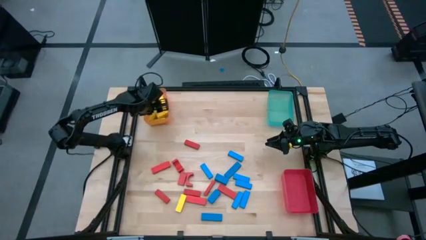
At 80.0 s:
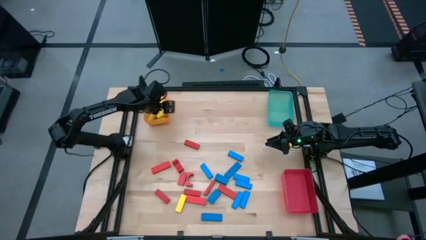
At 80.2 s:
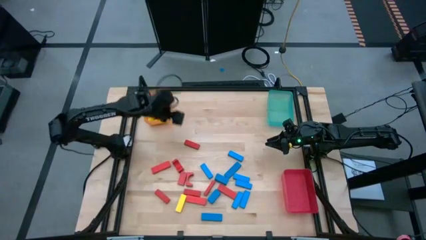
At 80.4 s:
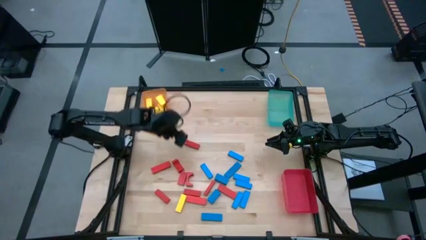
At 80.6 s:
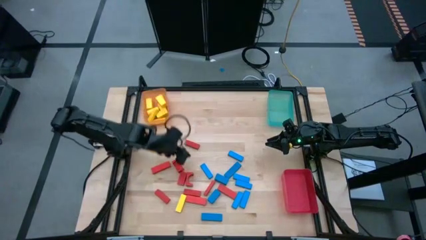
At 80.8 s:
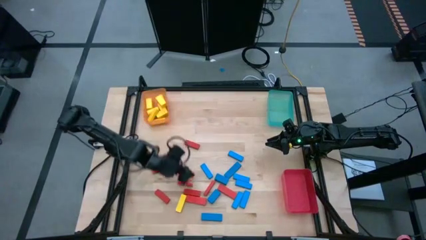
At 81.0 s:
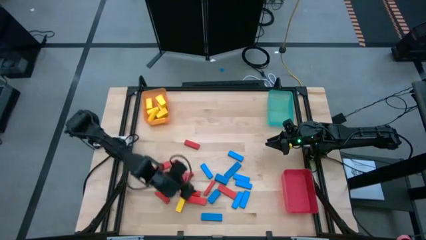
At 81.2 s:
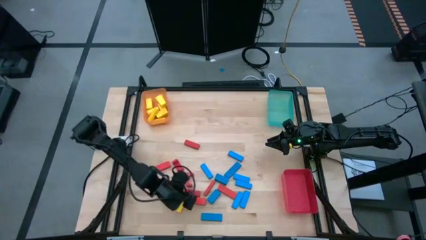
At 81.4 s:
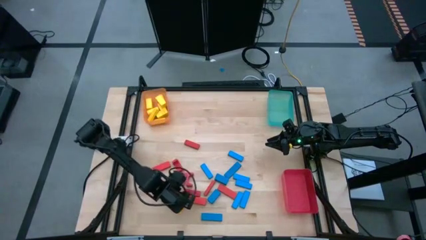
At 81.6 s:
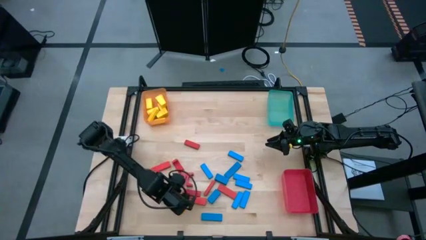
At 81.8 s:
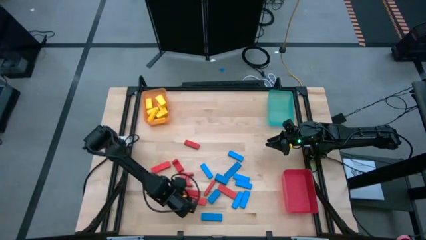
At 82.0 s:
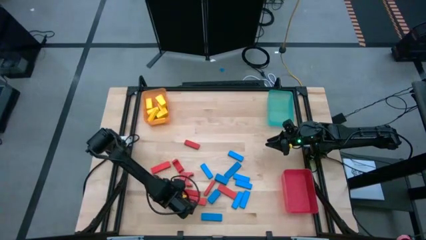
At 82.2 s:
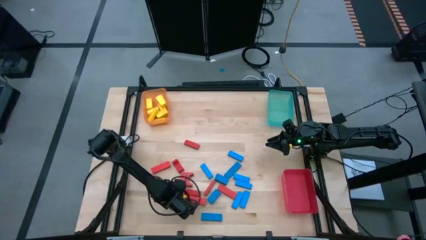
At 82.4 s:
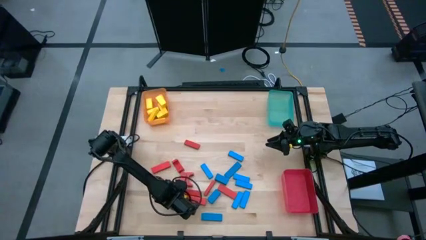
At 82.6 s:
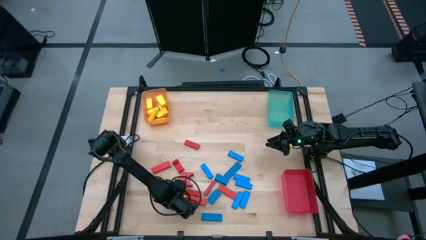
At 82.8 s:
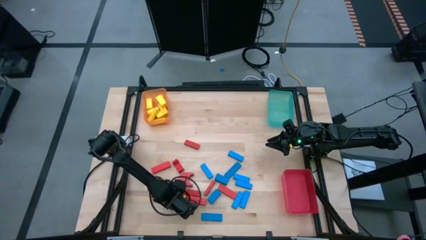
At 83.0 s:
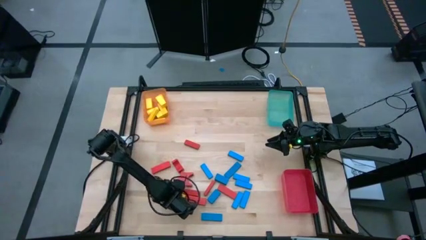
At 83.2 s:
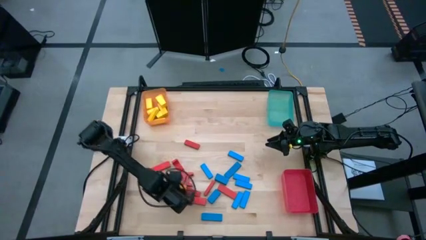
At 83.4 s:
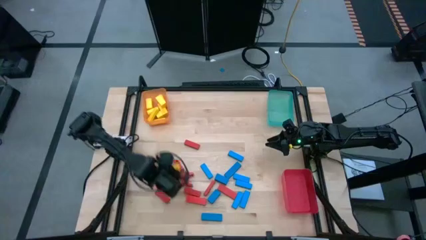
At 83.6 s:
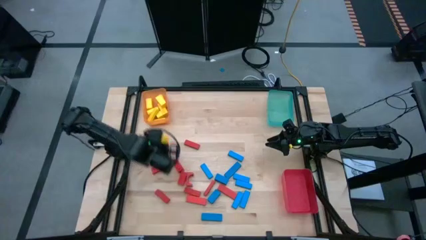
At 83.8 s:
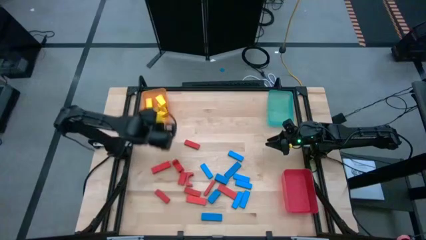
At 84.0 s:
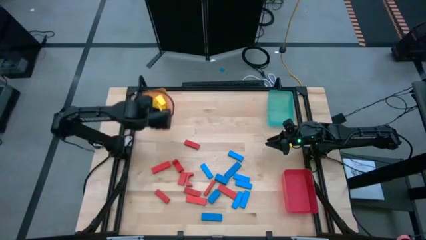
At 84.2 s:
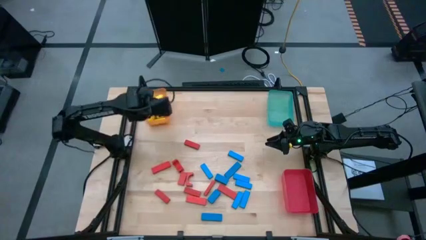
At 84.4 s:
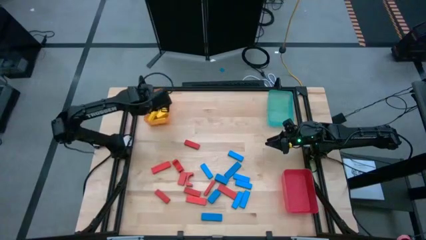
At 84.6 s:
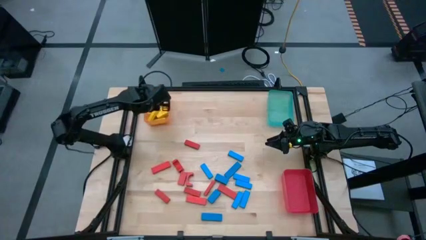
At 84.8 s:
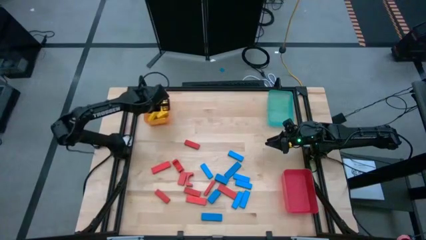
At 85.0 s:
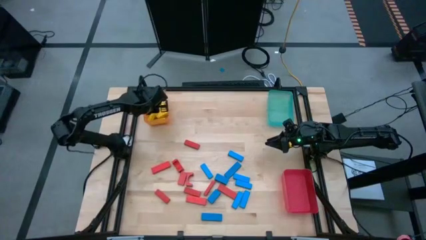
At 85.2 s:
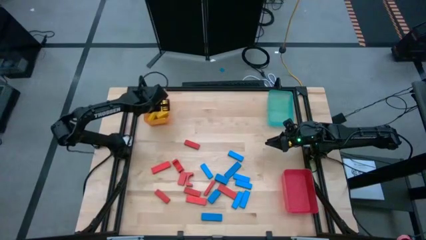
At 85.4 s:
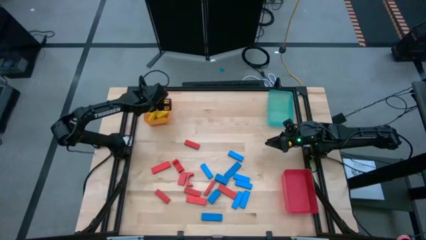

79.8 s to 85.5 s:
Task: Sort blocks
Put the yellow block into the orange bin

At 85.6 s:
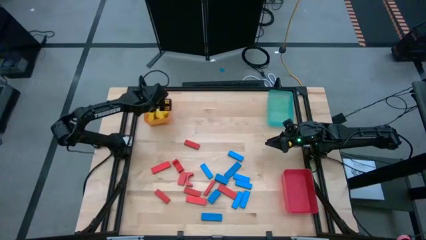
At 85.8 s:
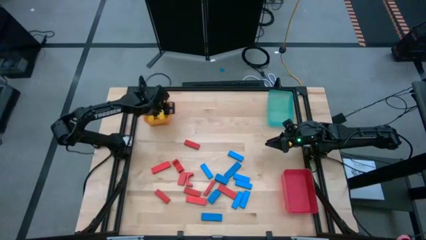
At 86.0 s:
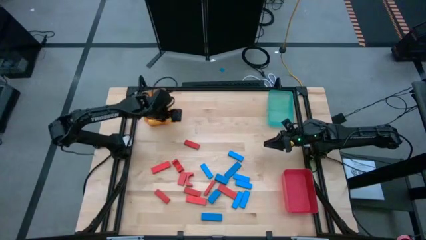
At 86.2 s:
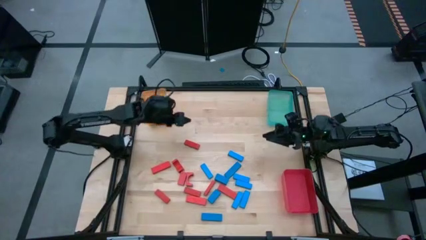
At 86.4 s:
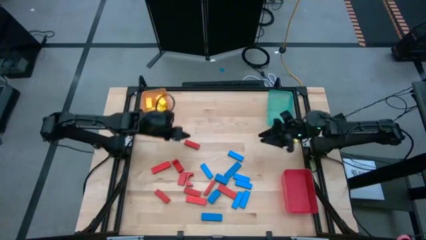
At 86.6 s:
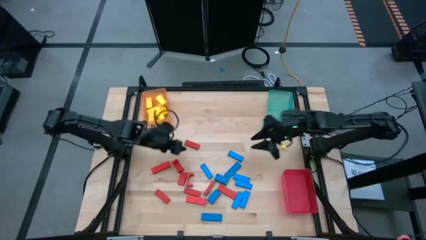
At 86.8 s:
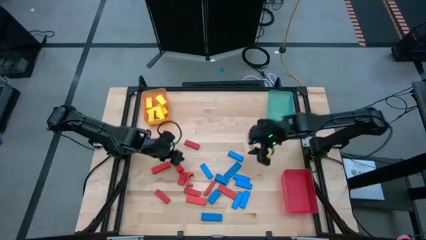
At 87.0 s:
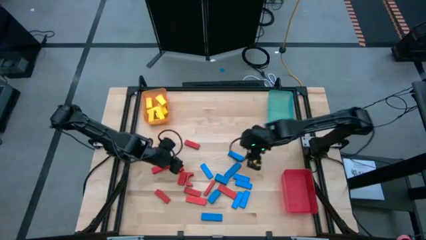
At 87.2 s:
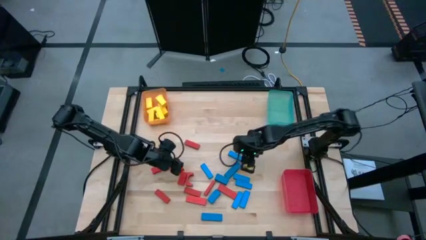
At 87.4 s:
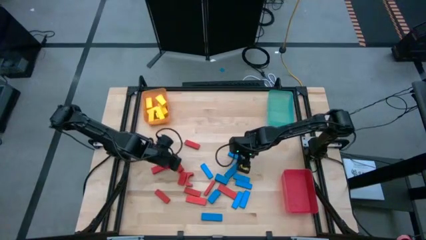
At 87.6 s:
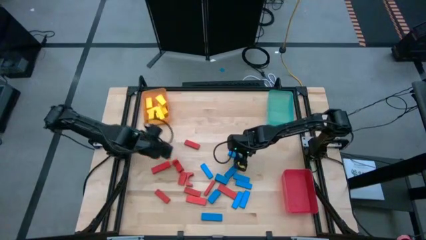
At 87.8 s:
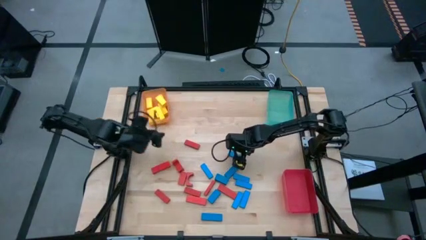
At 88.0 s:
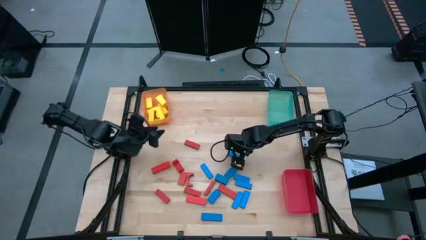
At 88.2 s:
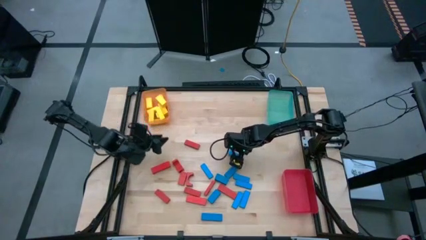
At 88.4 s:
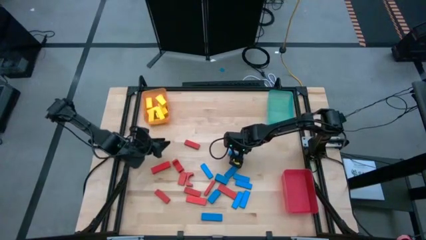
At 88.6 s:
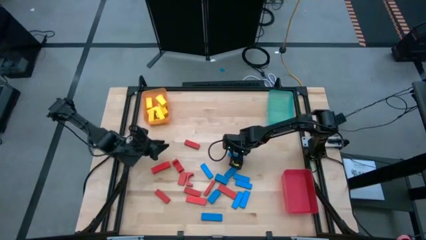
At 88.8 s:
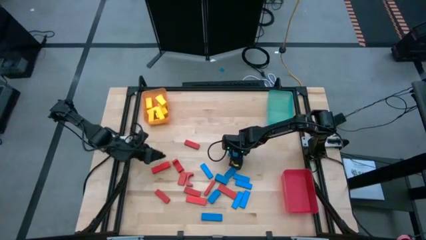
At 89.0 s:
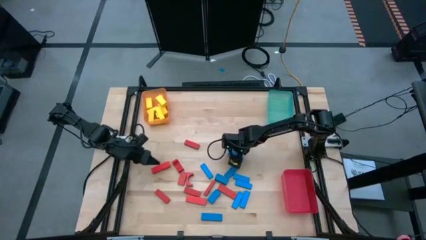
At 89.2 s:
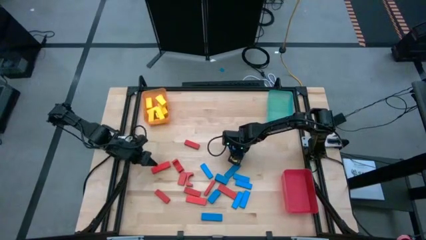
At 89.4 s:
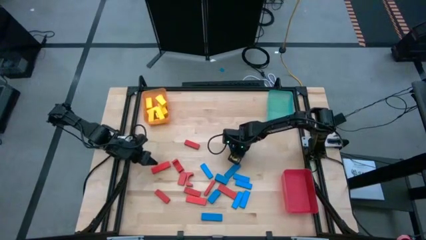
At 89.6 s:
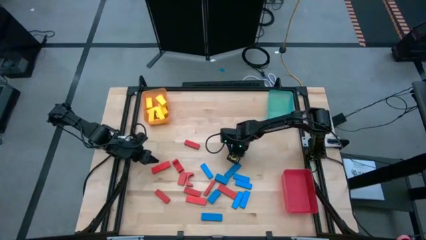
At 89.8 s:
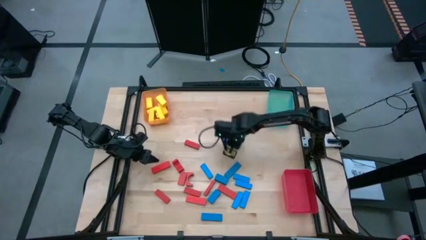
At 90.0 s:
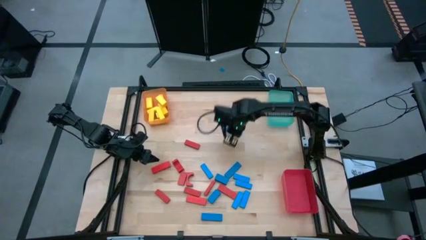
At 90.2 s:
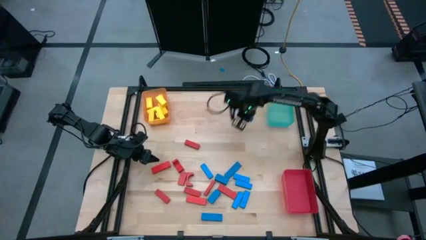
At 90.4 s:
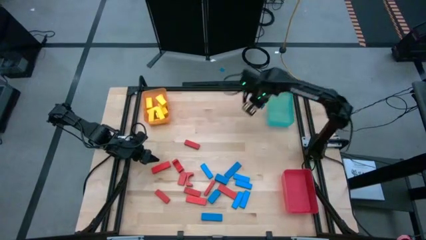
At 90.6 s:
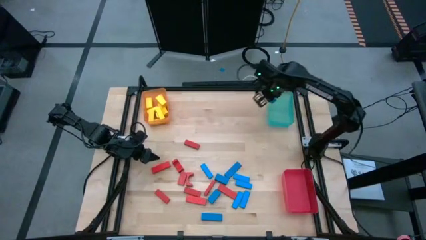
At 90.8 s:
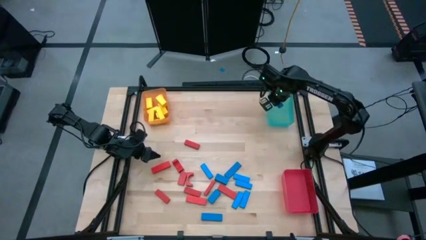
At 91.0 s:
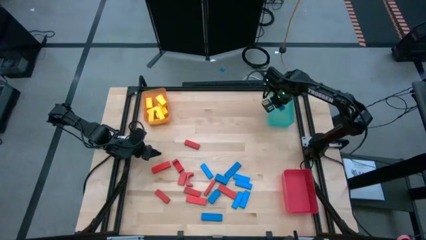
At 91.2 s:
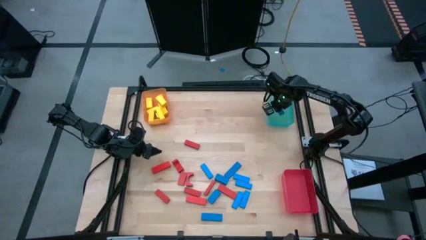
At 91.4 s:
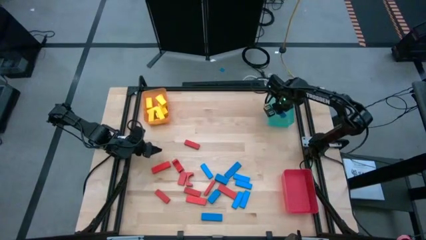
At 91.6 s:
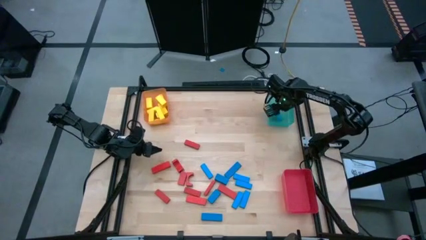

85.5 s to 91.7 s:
Put the blue block into the blue bin

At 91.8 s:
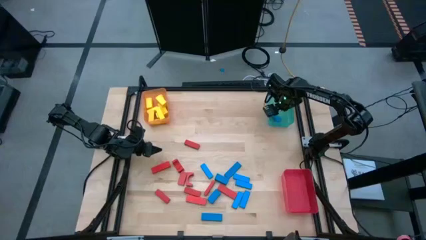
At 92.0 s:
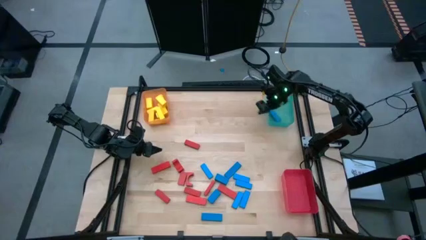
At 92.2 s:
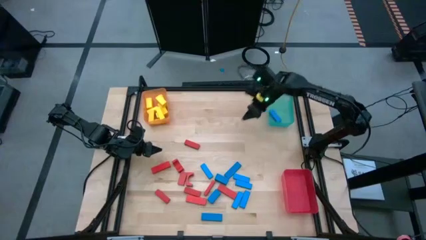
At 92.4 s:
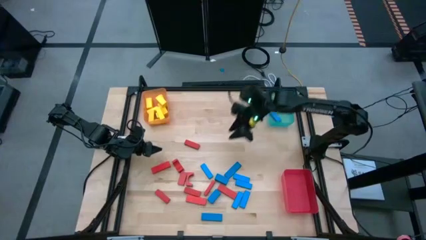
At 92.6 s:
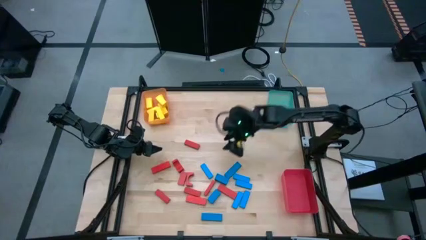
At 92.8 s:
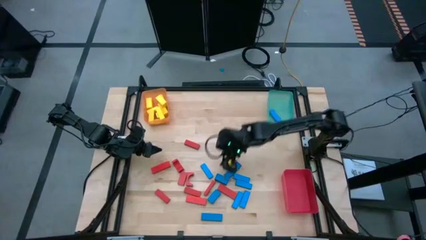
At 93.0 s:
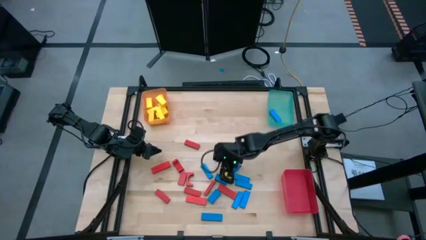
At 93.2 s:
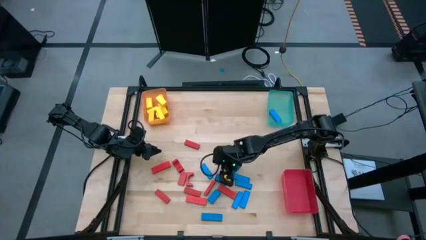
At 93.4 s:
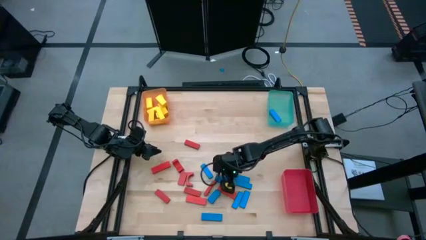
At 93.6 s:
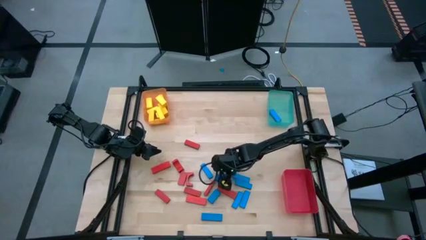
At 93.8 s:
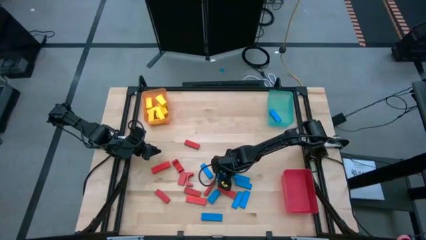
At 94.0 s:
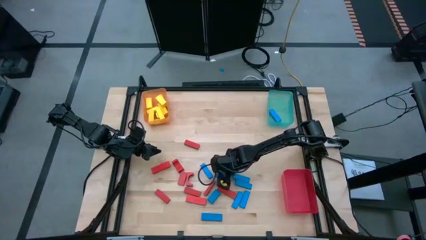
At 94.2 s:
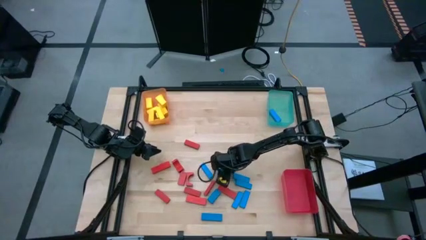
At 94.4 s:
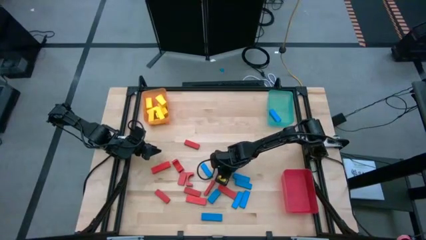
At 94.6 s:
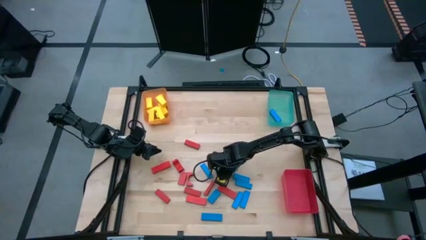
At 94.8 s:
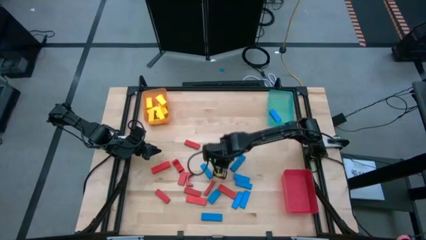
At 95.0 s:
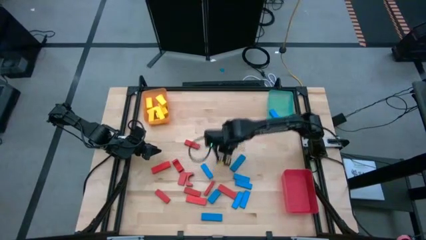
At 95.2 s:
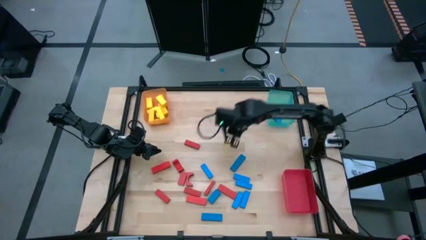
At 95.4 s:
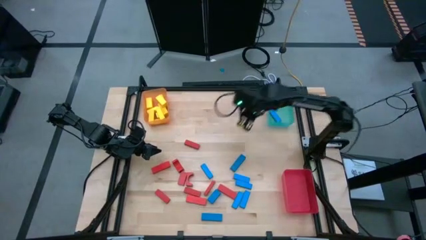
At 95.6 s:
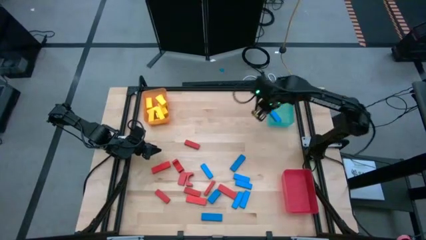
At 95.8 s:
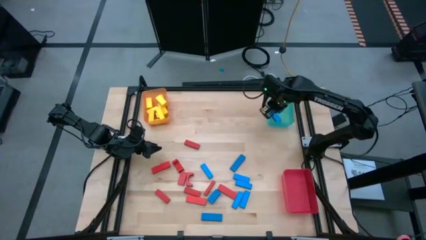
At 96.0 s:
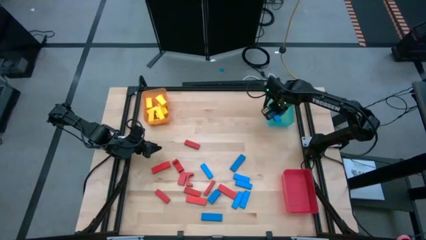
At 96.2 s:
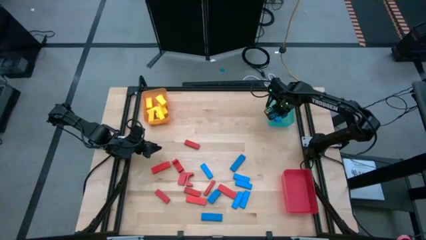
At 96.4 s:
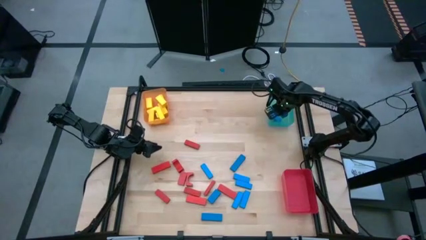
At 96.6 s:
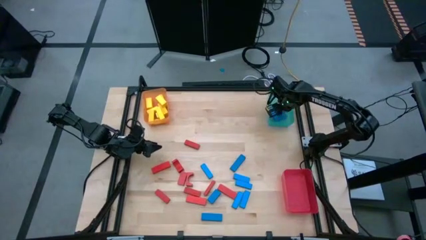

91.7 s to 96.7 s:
Put the blue block into the blue bin
